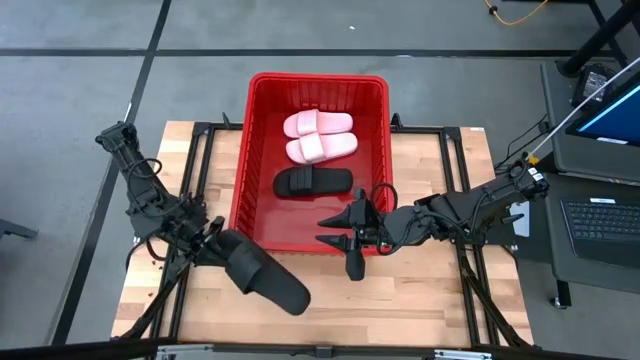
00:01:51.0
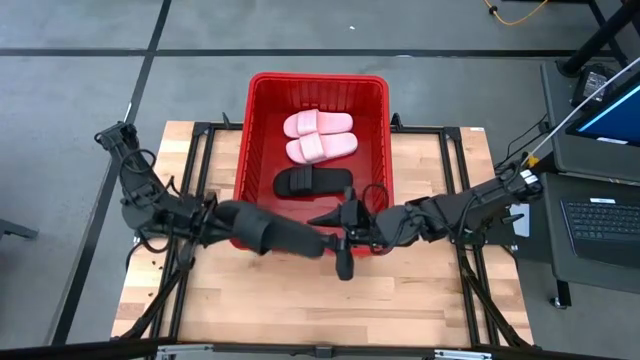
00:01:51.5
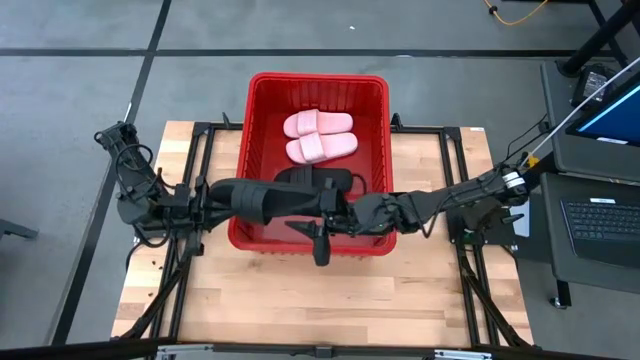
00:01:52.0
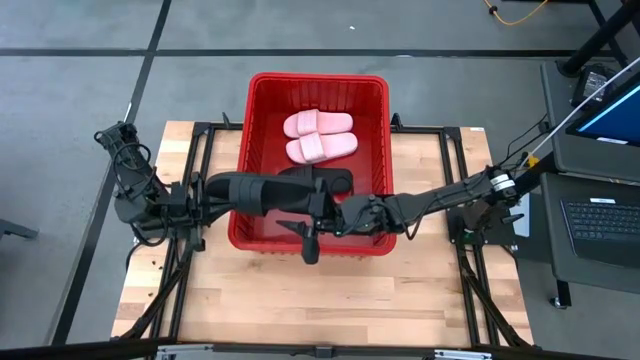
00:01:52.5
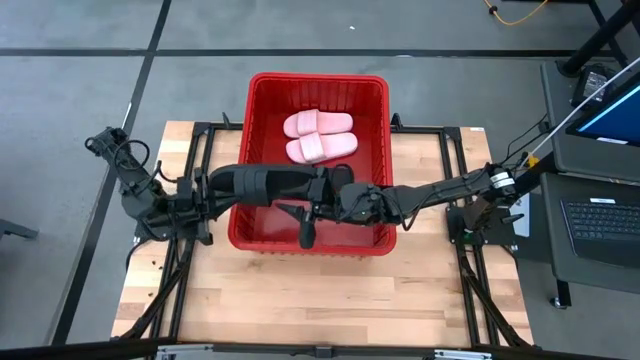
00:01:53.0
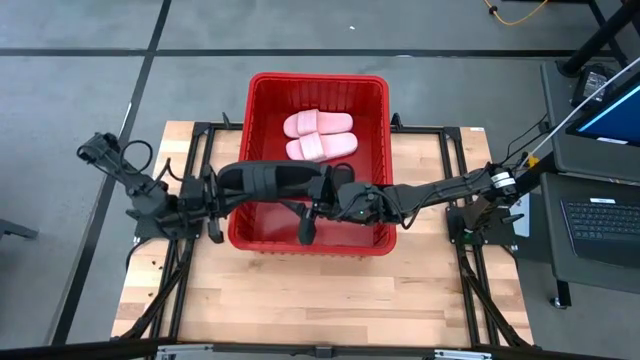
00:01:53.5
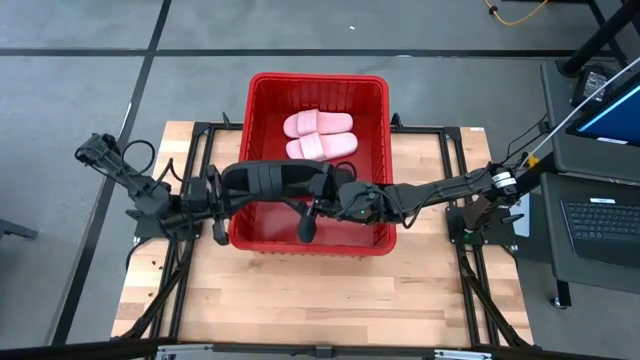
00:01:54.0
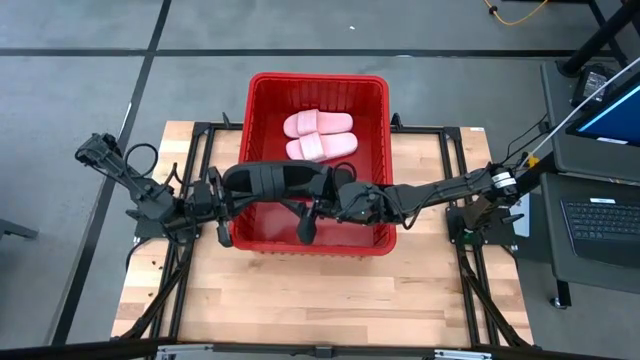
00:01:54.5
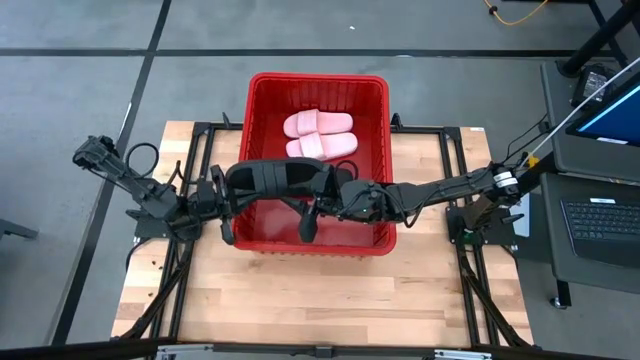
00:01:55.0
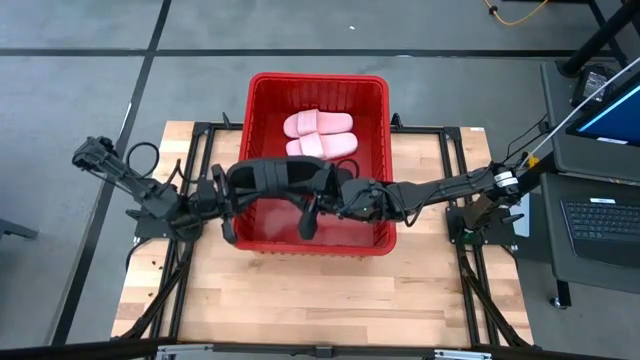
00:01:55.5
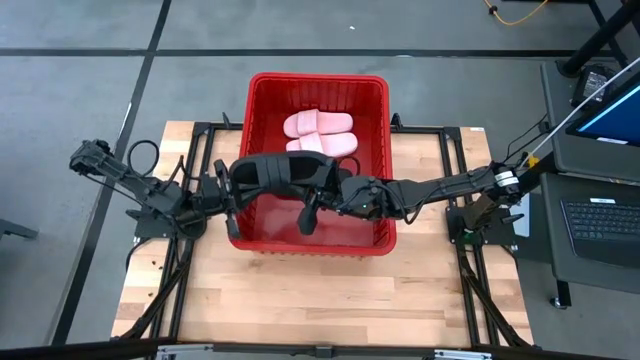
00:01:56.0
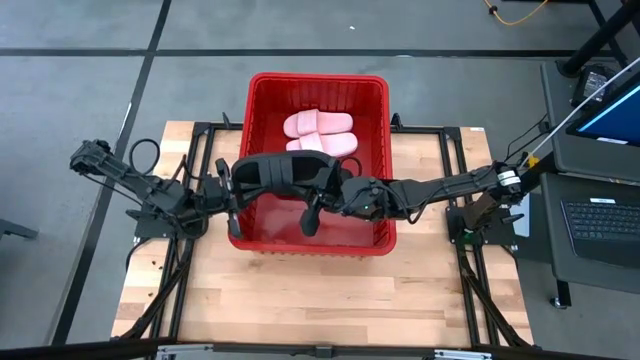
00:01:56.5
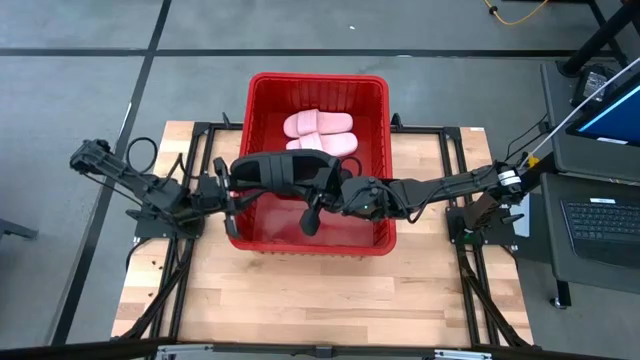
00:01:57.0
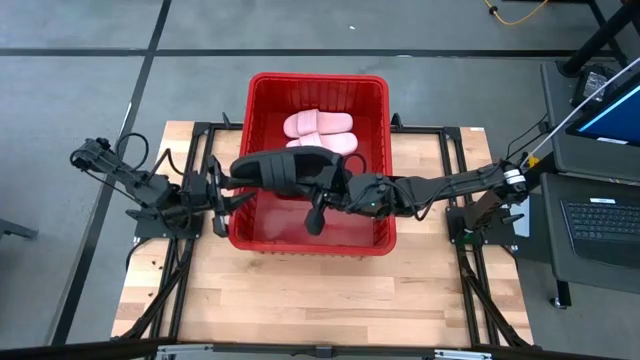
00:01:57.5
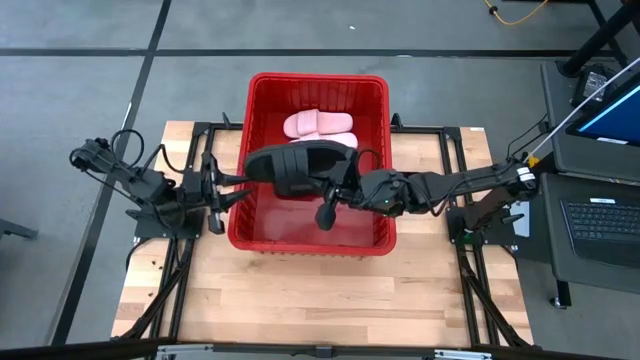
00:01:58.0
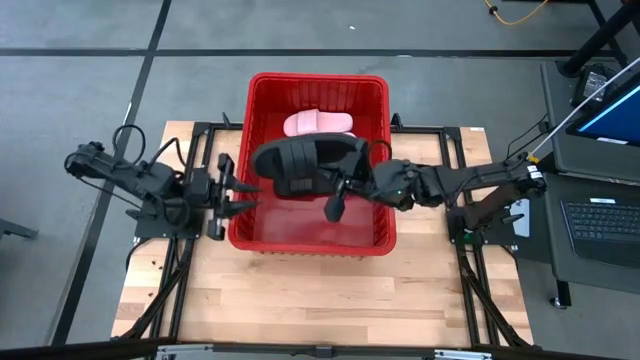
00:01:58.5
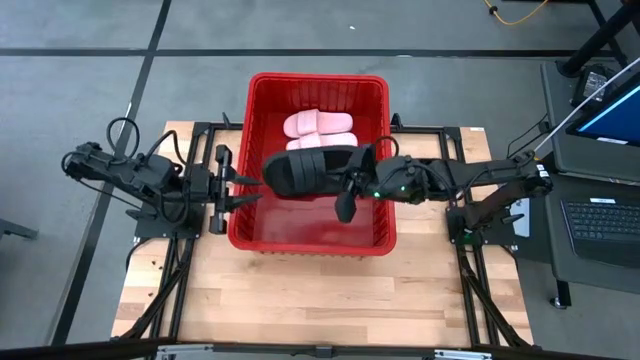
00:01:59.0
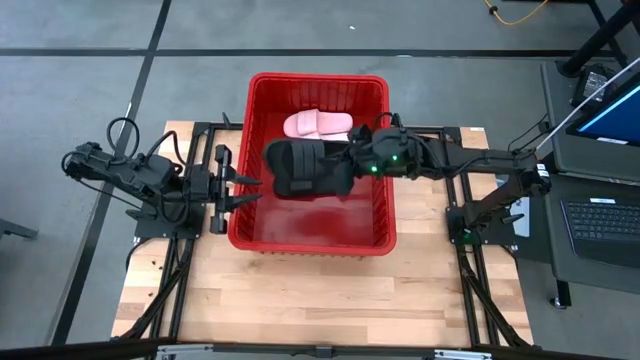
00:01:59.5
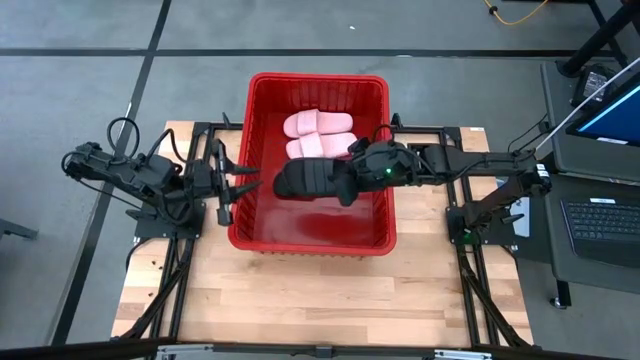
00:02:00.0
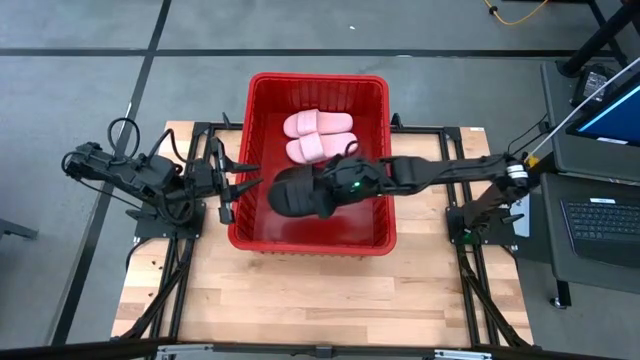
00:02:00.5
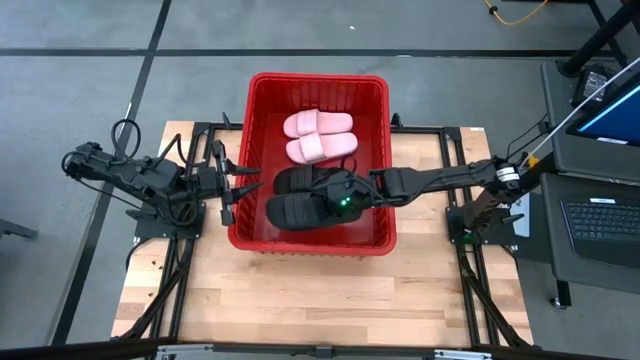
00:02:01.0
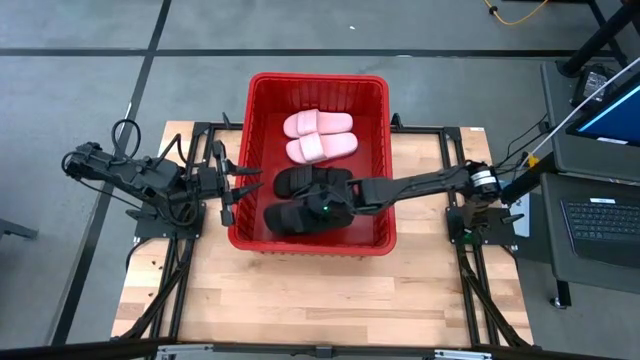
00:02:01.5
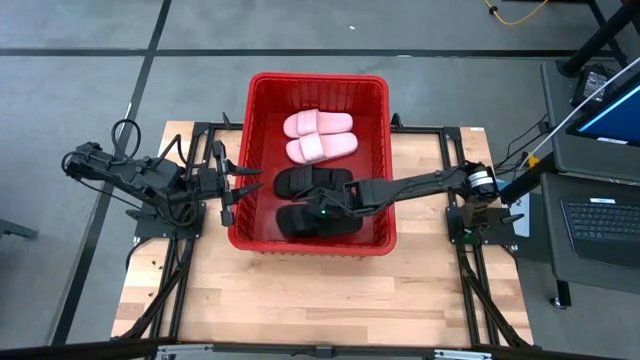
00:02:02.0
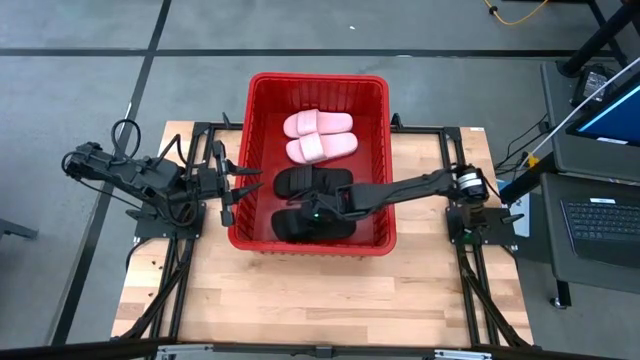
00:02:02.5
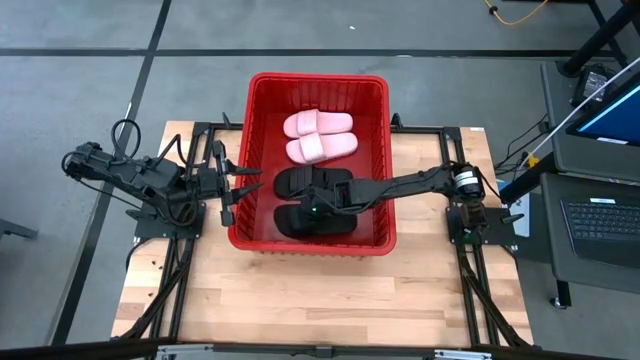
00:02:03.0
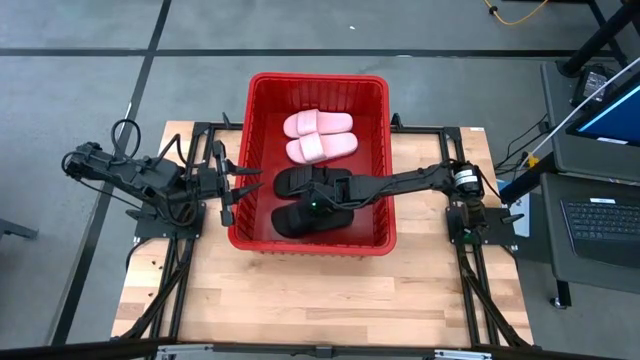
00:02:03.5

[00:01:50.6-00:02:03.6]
Task: Pick and place slides into bin
Put the black slide into the bin

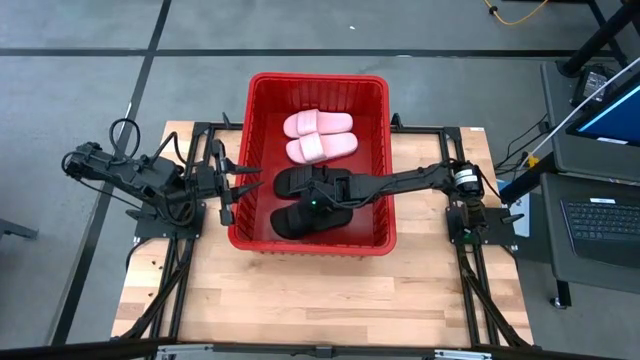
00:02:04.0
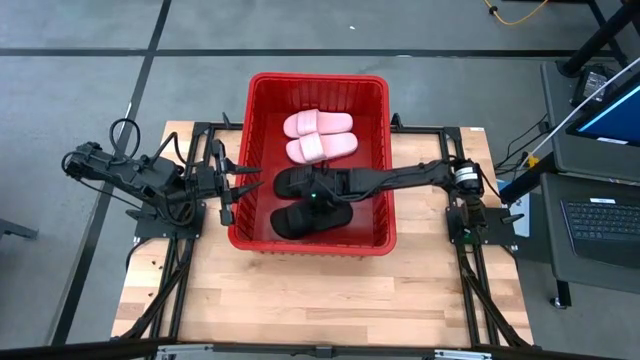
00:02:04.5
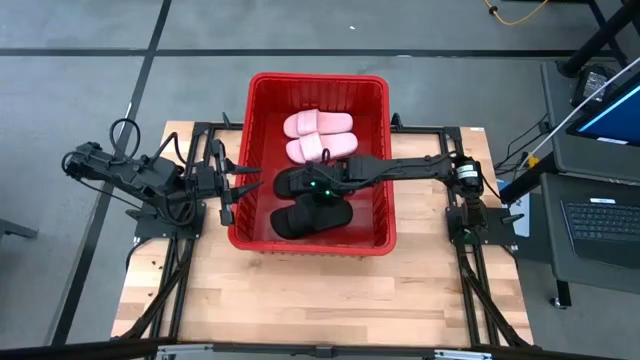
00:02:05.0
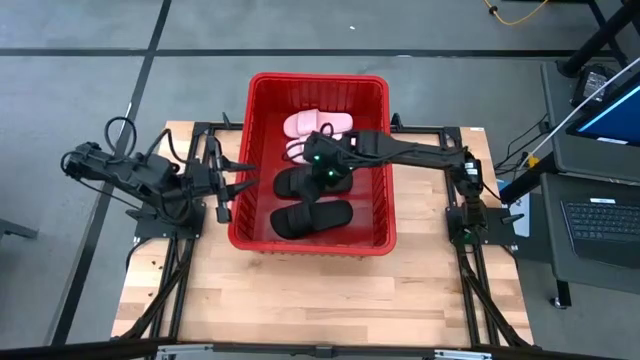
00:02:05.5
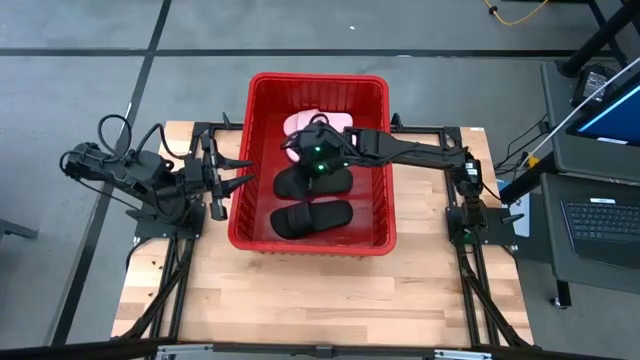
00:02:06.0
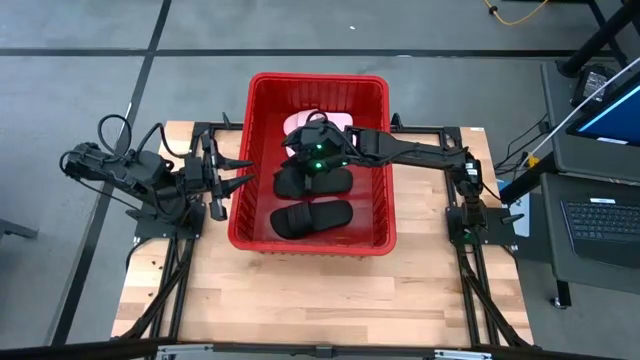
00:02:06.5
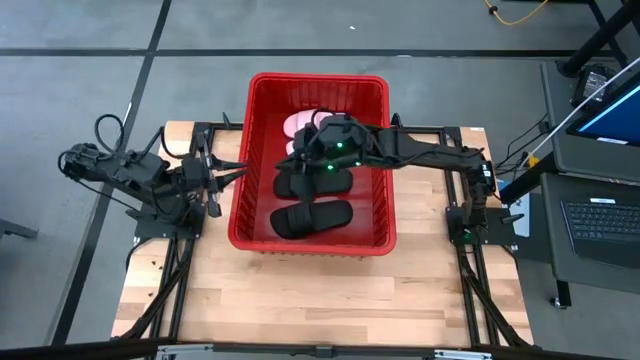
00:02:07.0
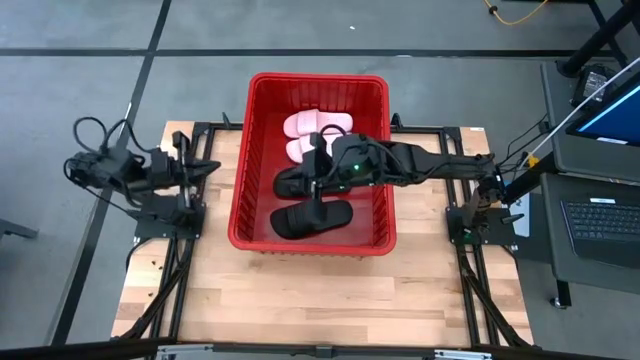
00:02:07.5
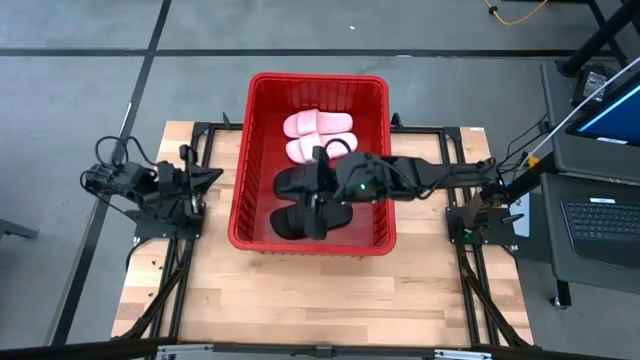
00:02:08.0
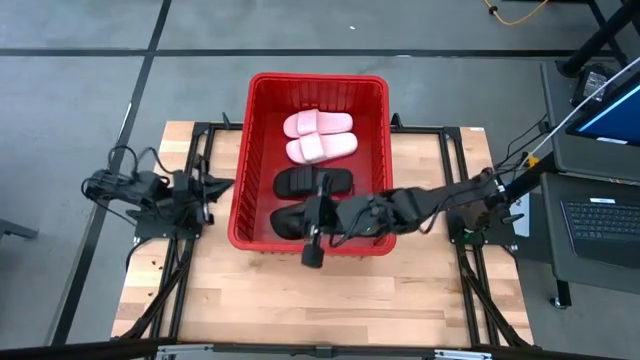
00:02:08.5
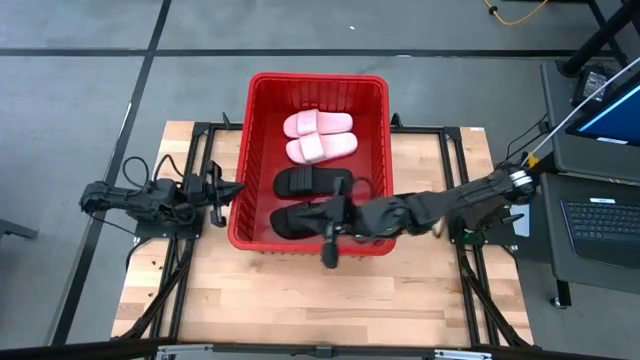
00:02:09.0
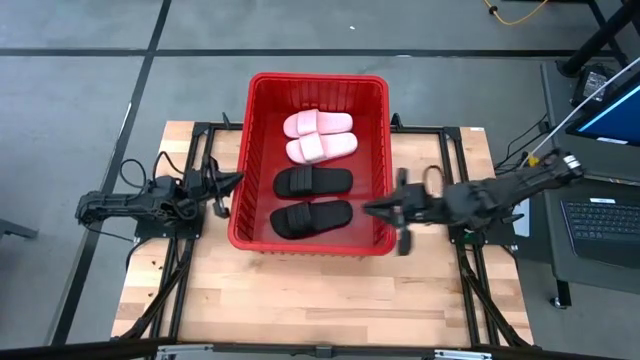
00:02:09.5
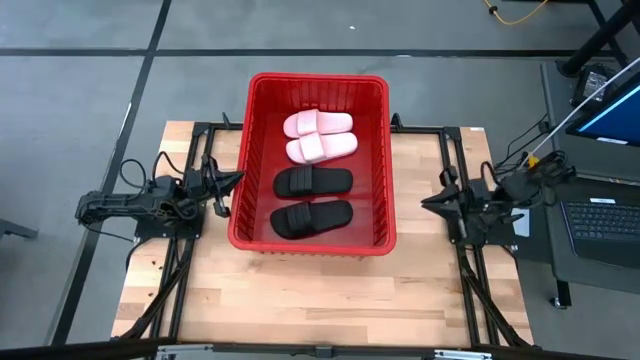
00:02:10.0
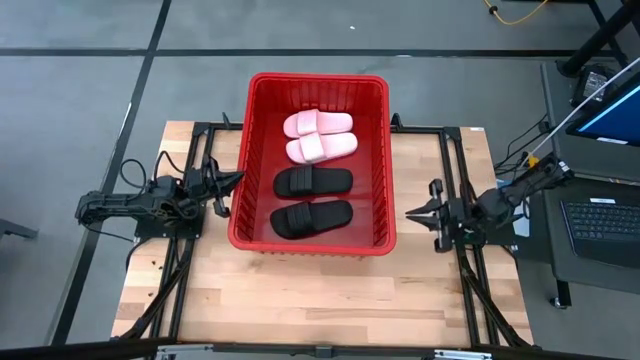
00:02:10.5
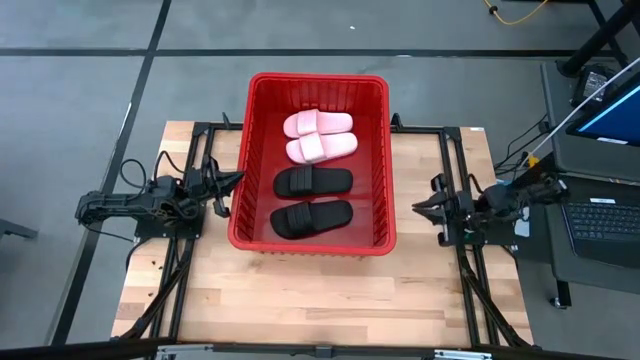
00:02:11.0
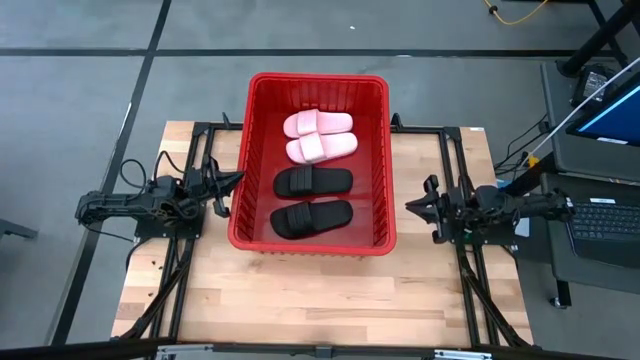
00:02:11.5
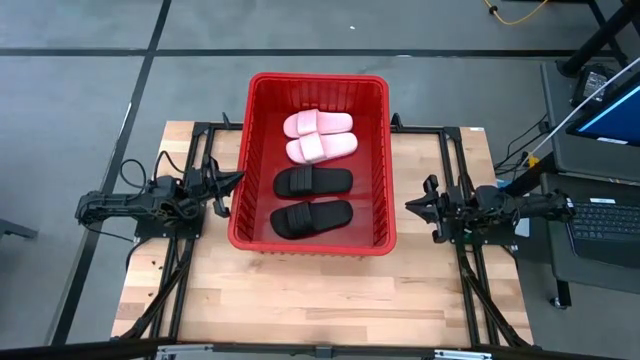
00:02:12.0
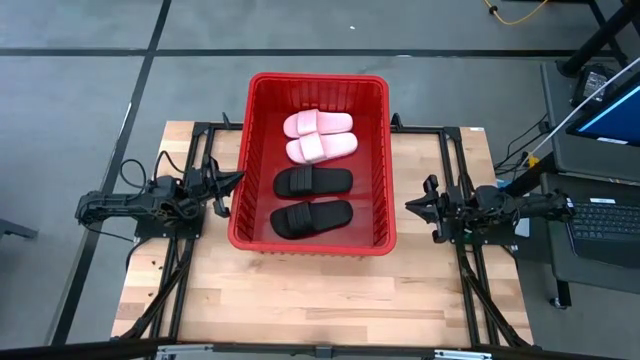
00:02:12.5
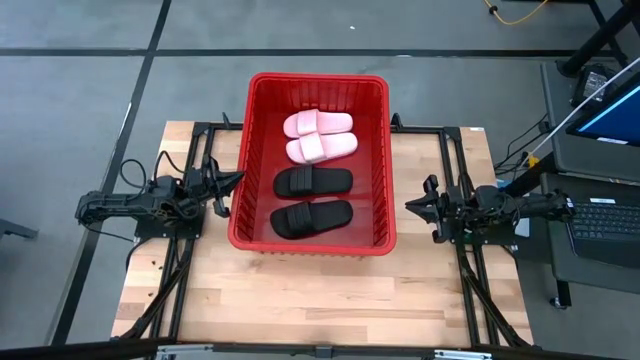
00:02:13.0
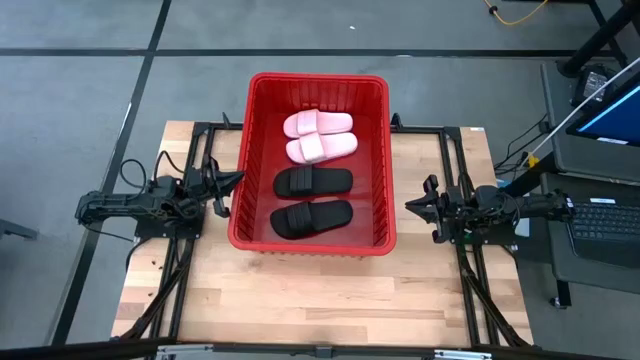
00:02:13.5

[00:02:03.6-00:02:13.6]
Return to Home Position
